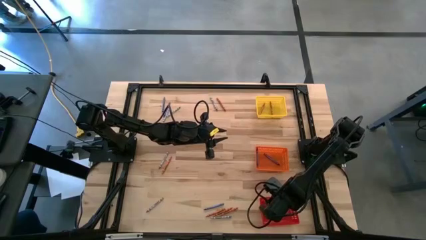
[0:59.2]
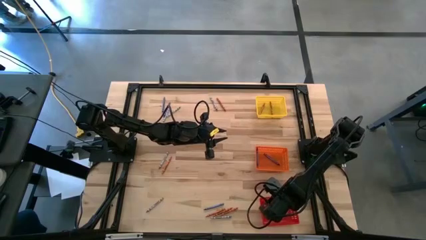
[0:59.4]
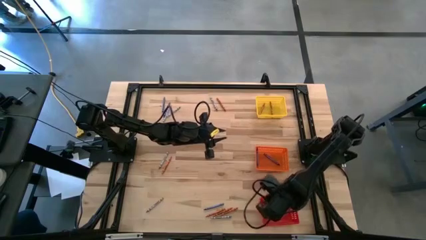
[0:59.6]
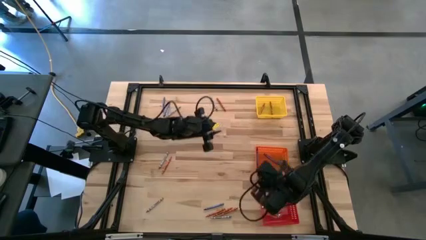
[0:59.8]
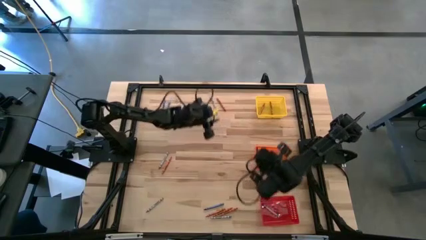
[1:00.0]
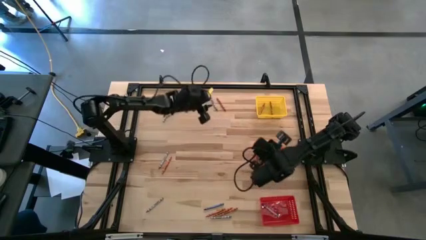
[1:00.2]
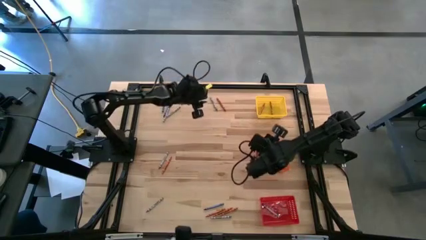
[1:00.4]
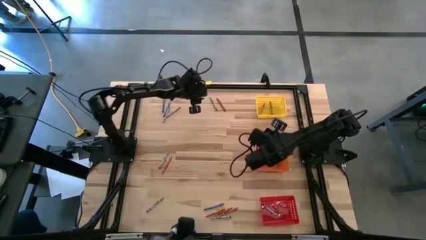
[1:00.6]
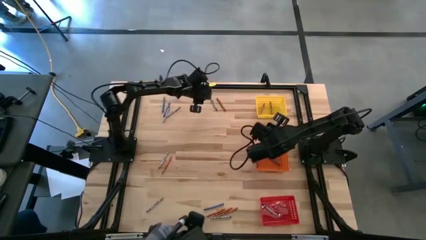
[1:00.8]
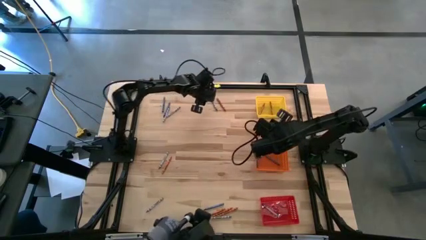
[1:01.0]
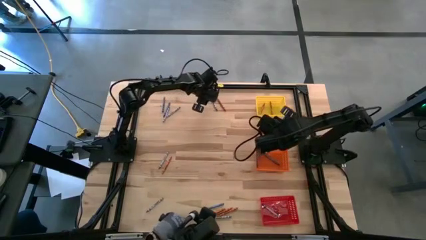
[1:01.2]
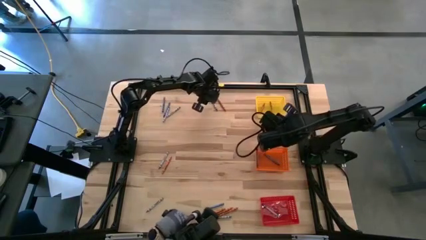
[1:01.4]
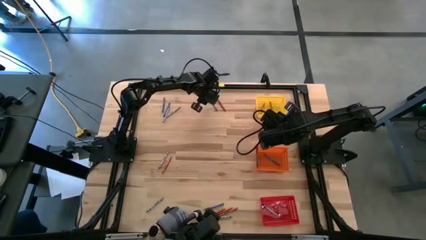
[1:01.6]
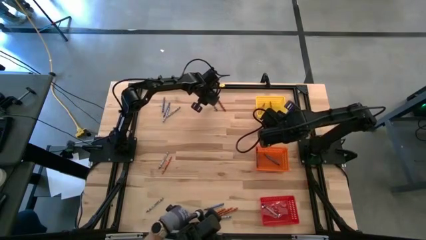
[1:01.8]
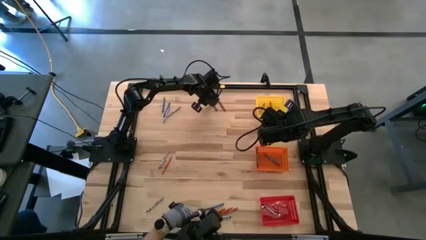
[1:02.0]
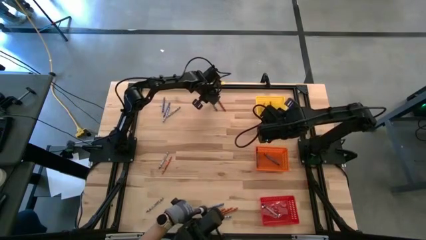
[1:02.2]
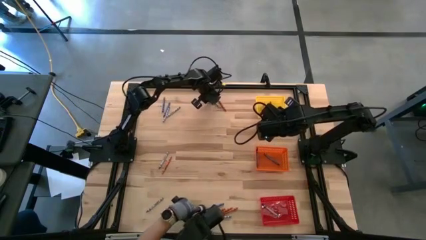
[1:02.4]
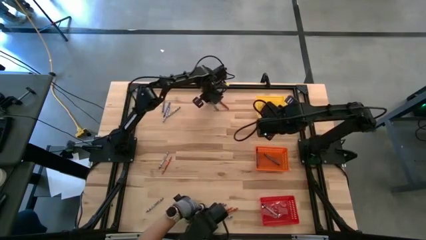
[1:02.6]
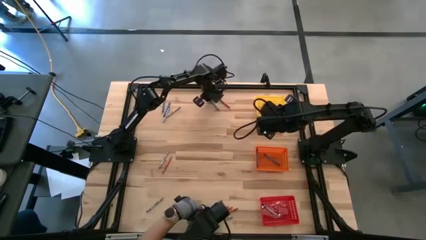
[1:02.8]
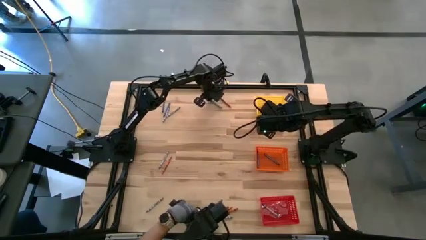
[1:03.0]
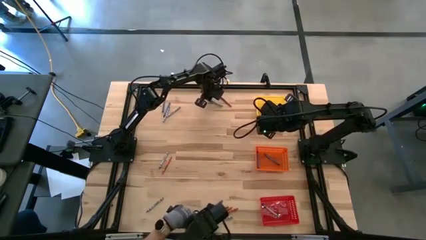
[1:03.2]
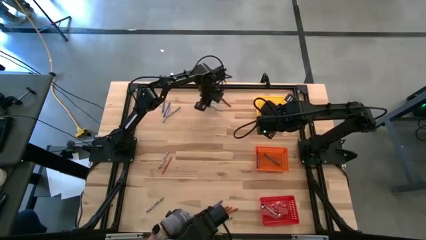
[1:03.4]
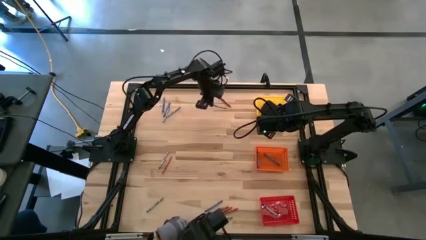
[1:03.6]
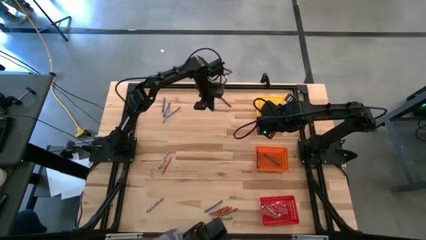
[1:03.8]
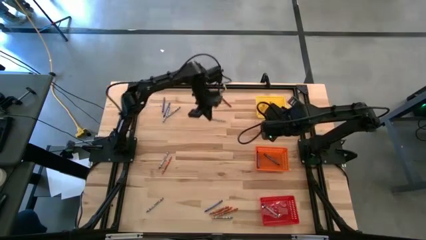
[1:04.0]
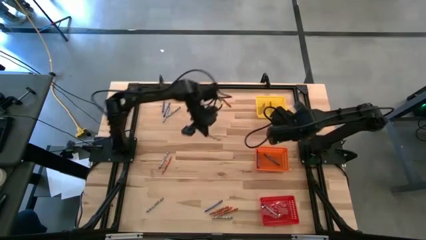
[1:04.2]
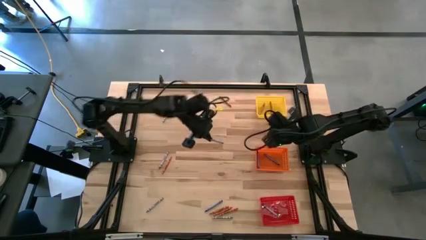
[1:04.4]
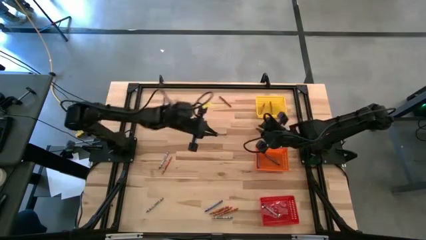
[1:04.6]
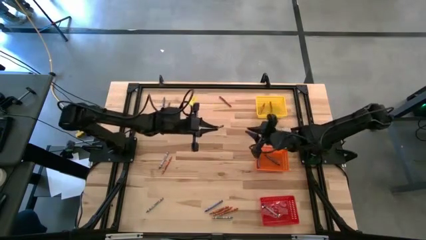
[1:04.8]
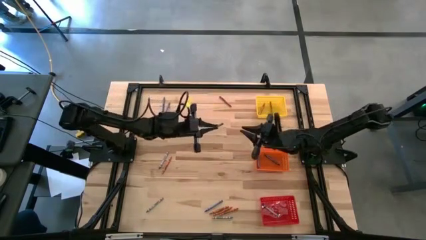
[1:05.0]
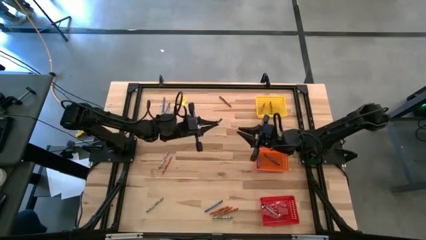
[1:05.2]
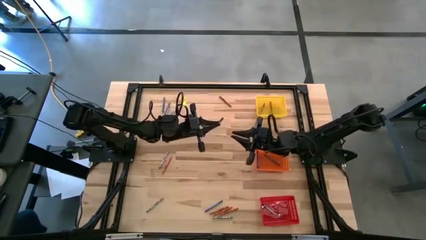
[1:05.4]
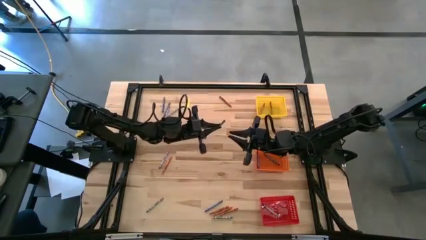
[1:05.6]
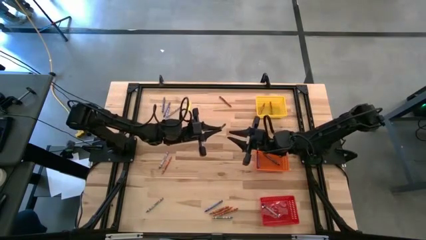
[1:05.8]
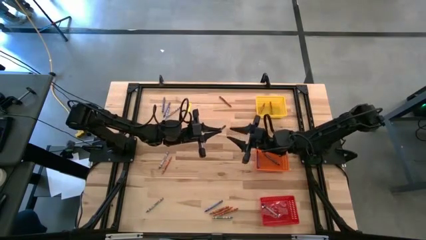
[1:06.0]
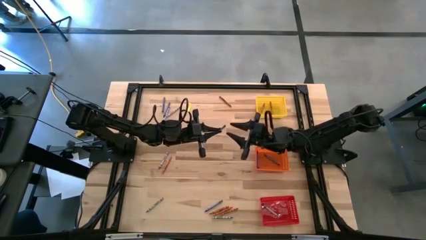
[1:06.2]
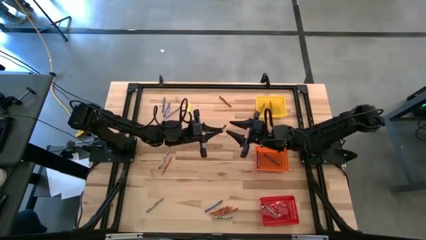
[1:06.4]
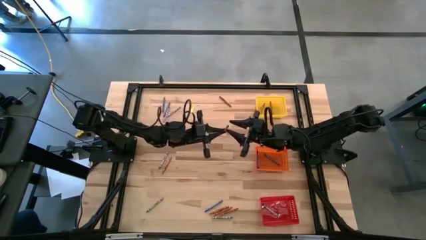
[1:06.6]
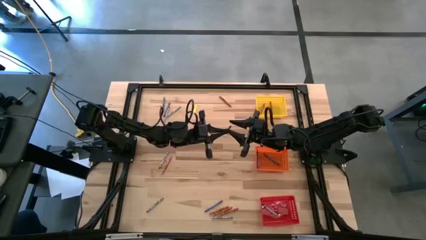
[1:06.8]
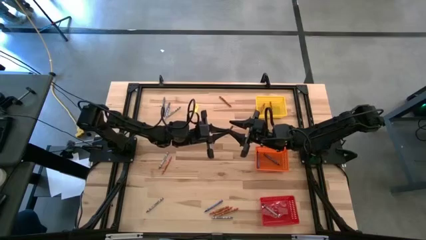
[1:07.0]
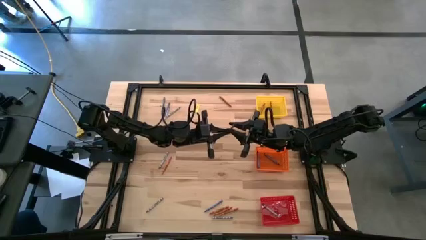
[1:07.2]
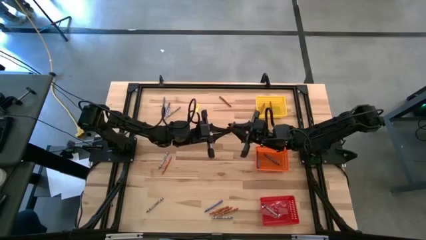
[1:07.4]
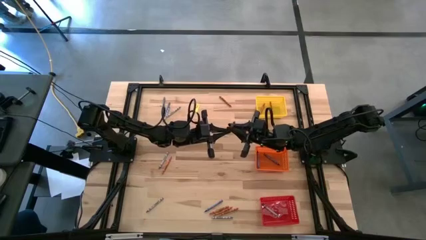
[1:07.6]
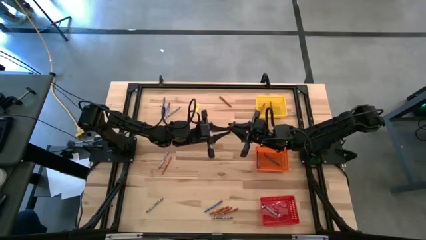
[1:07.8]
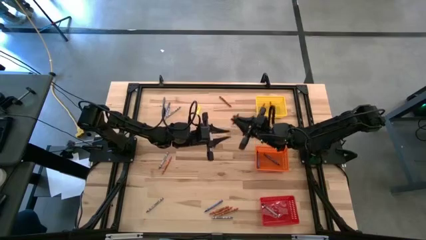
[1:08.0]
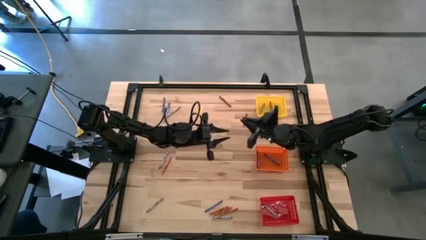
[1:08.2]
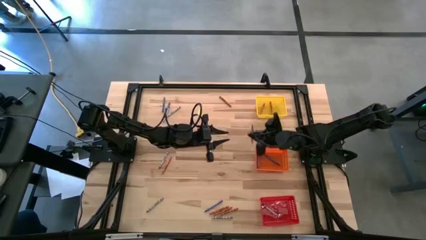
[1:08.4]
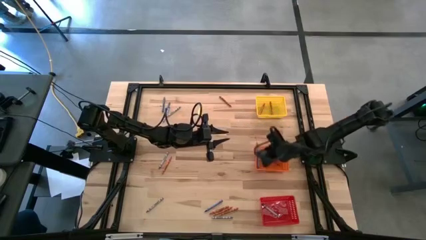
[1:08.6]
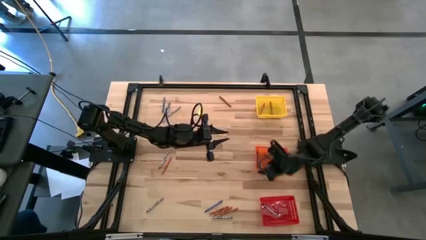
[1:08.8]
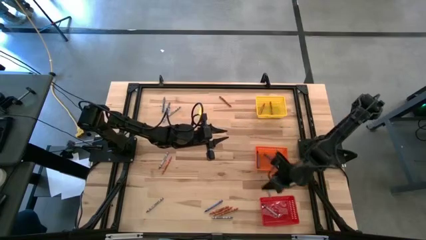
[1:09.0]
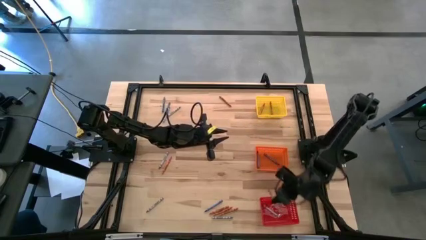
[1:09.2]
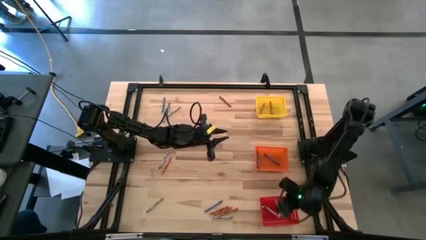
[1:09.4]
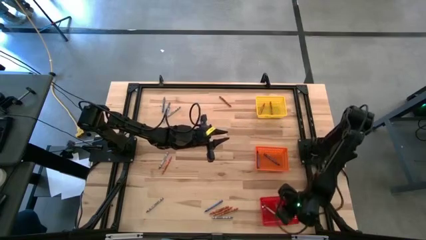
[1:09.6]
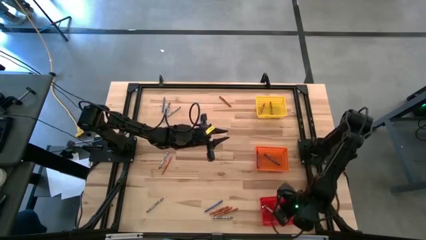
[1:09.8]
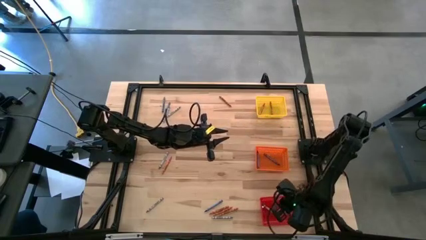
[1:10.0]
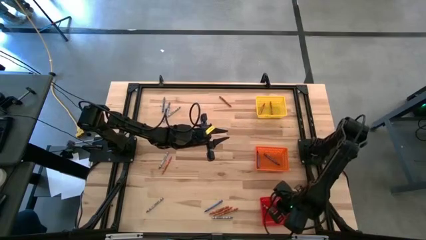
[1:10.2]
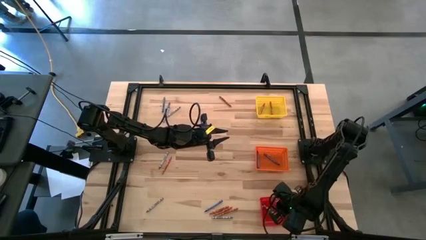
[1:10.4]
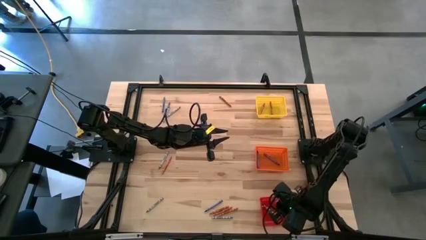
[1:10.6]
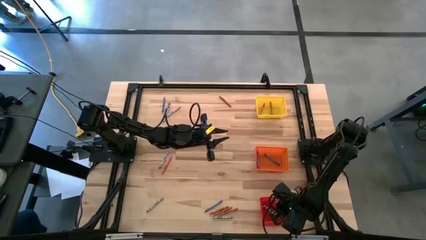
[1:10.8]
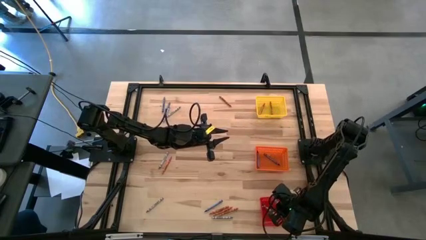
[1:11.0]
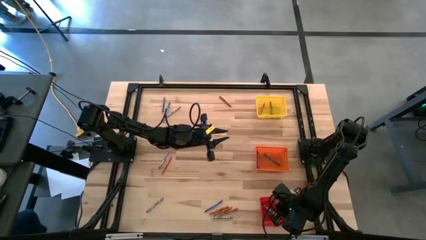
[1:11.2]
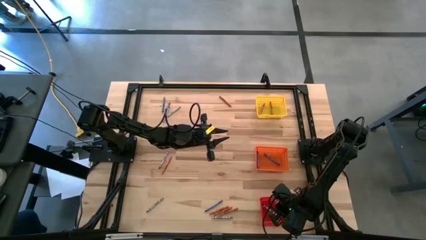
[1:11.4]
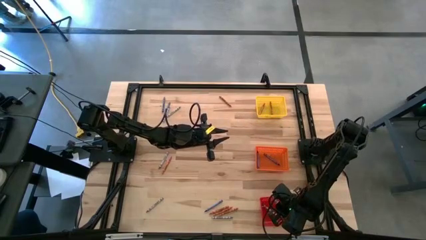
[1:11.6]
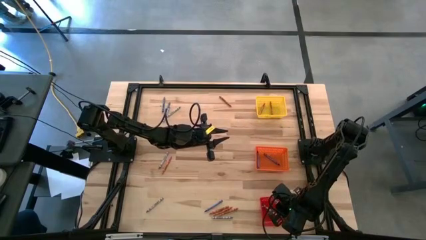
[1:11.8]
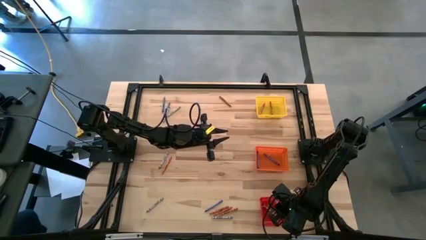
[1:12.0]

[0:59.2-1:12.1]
Task: Sort crayons
Put the gray crayon into the red bin
